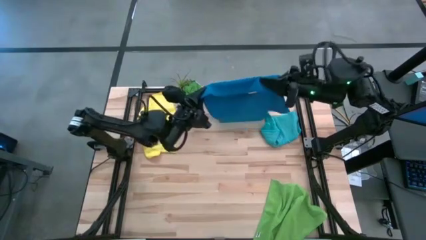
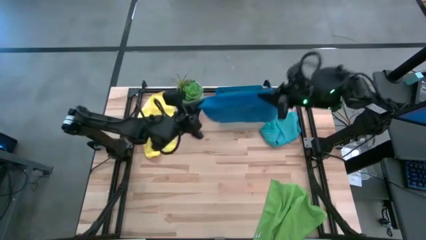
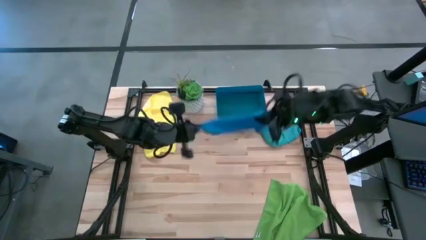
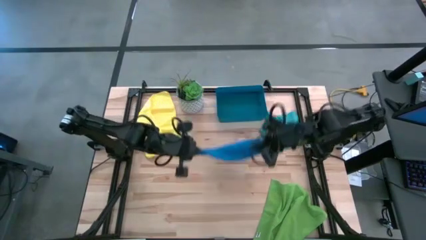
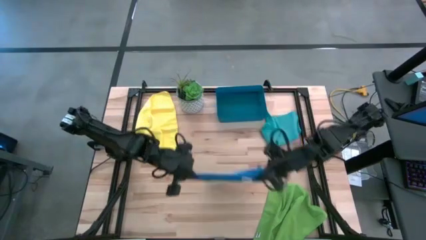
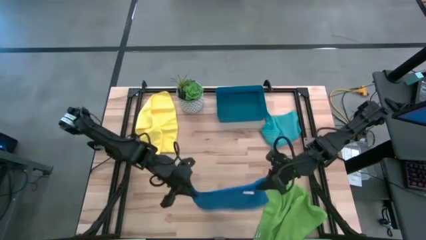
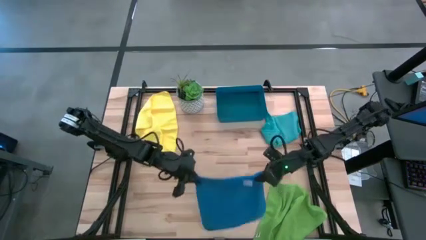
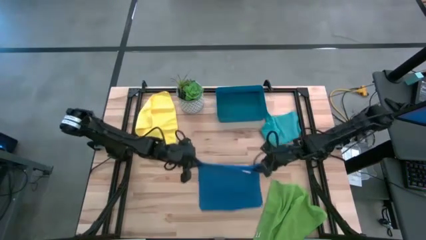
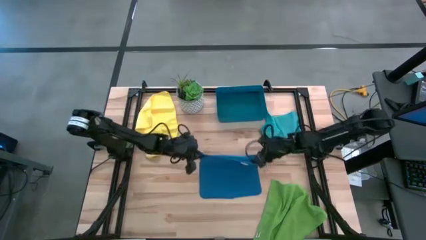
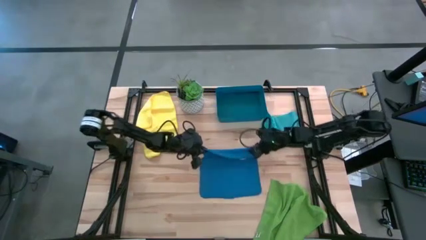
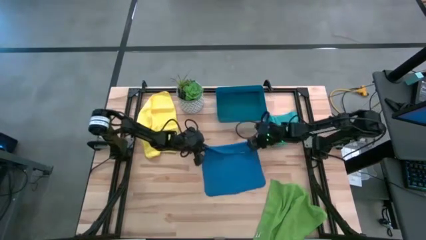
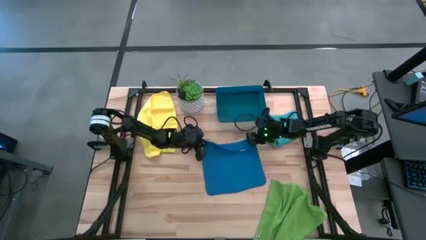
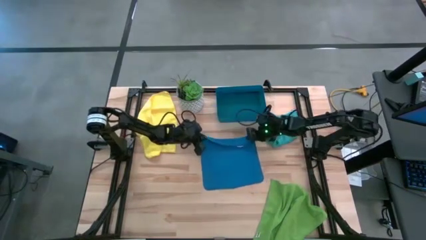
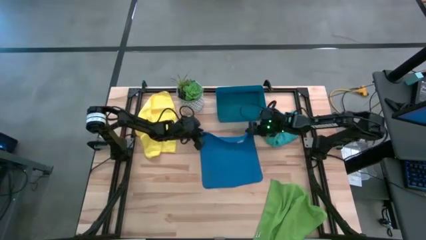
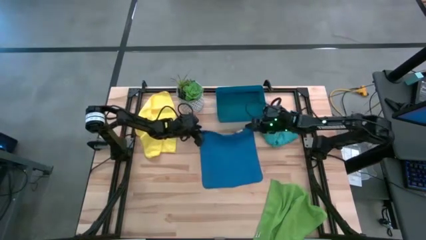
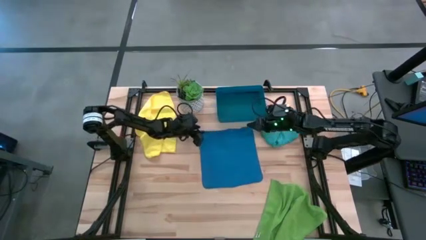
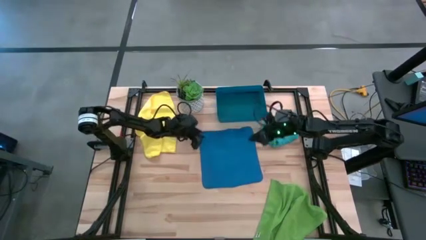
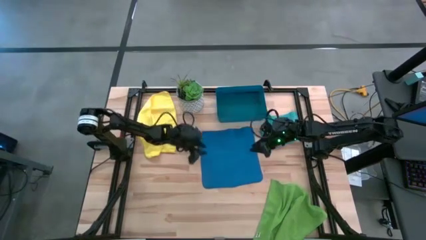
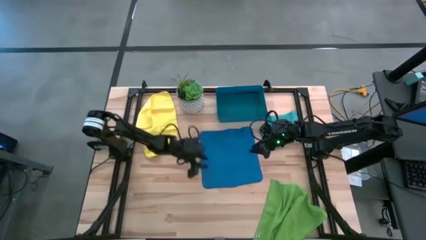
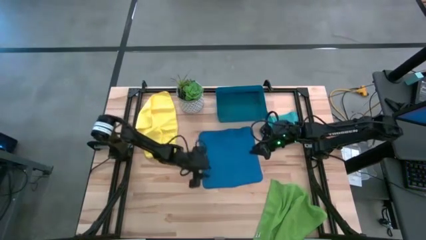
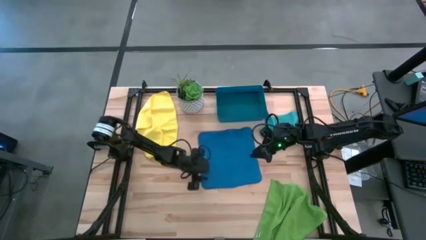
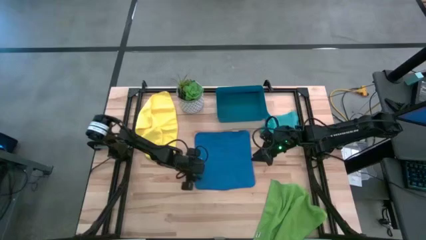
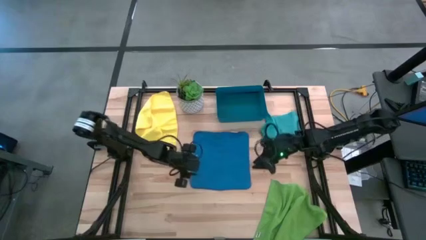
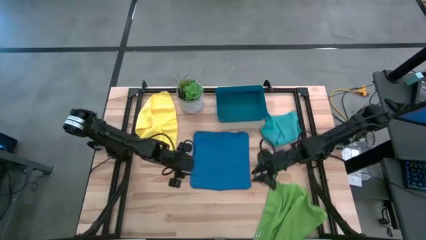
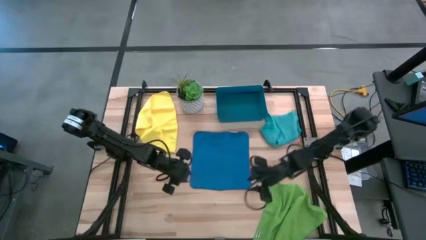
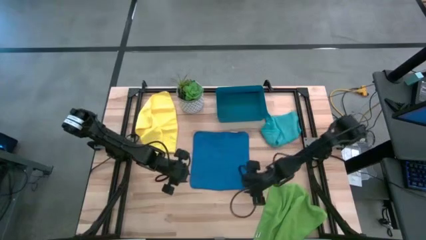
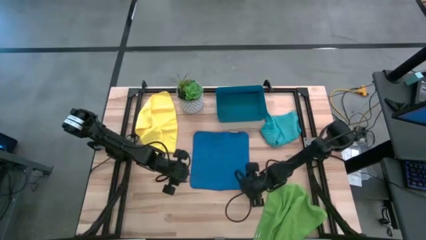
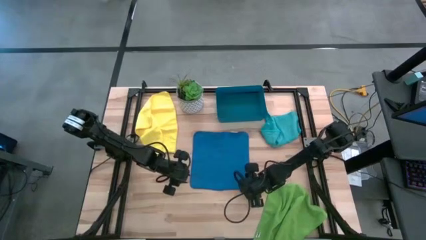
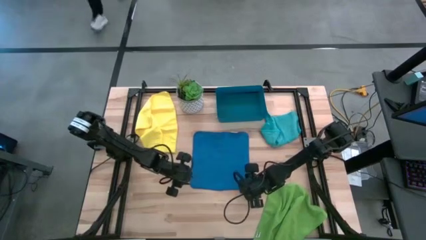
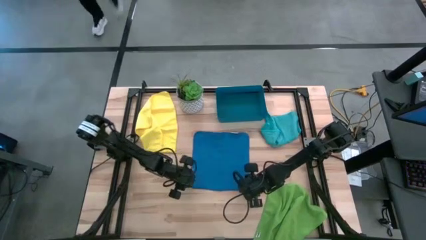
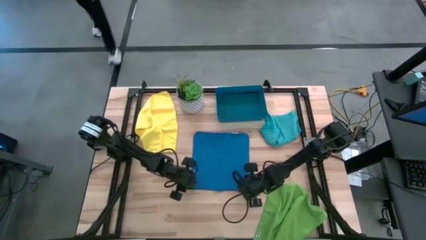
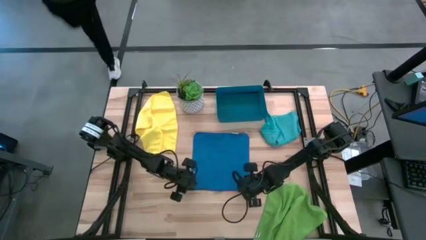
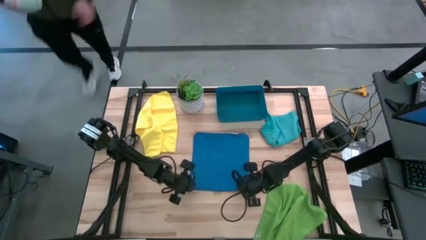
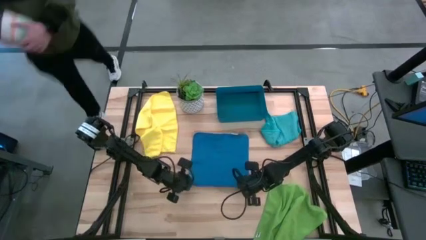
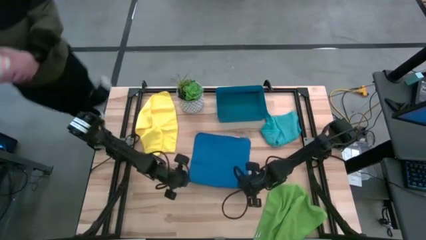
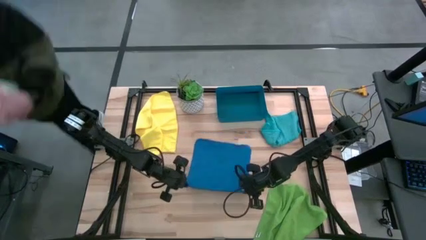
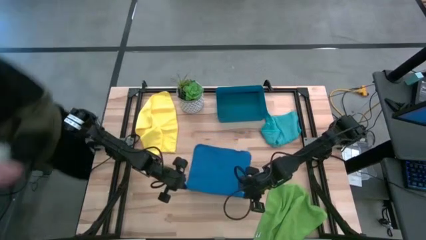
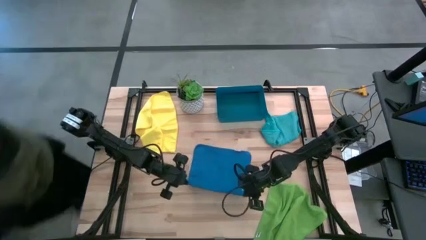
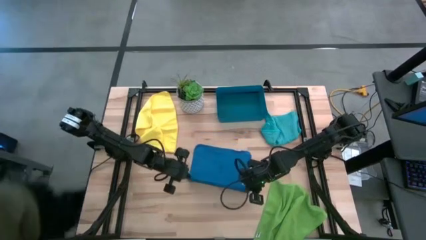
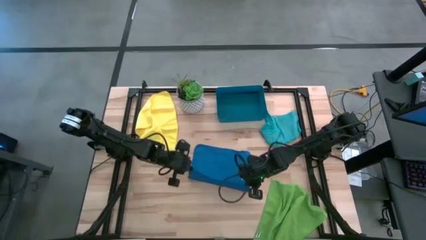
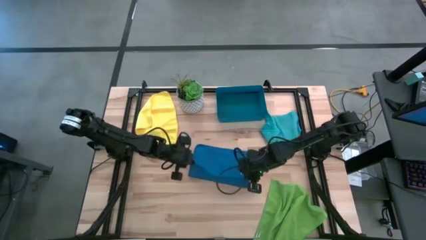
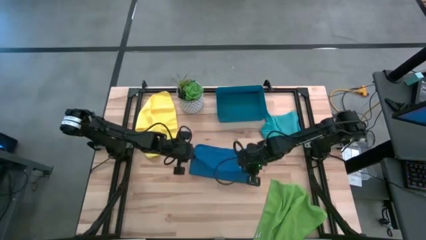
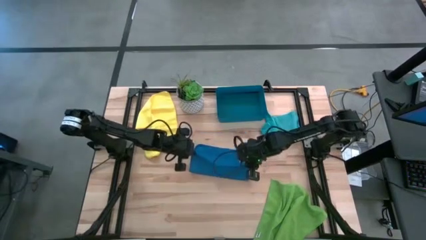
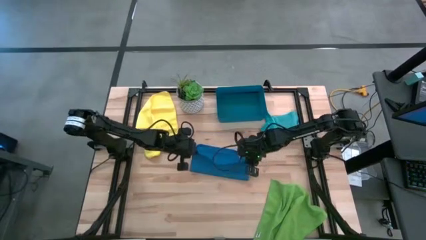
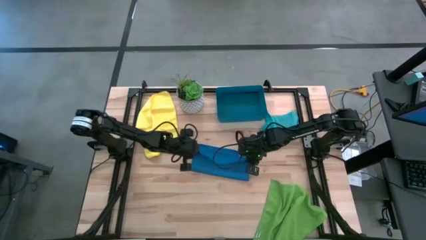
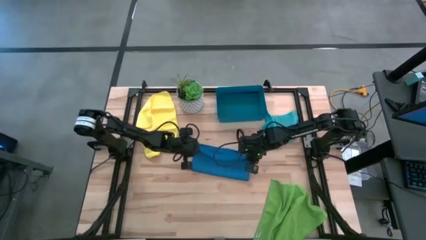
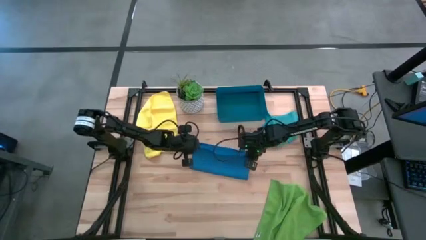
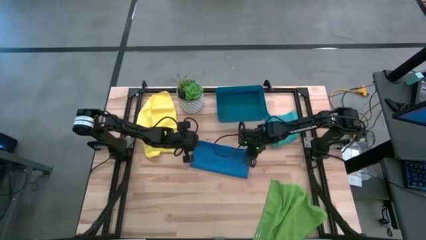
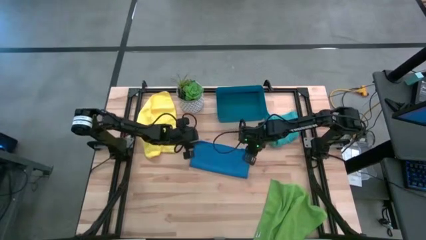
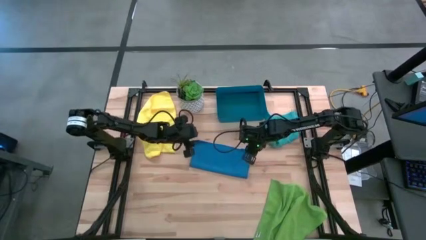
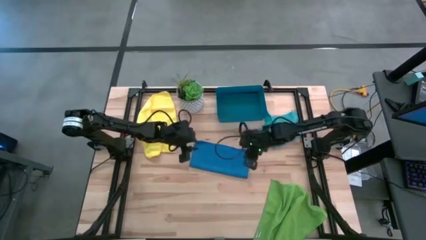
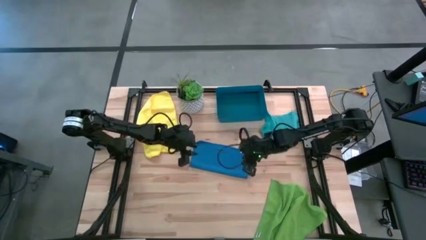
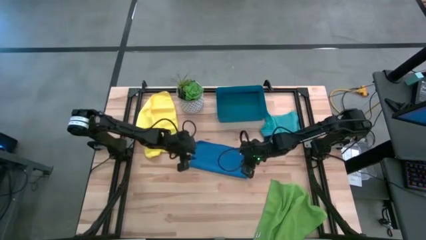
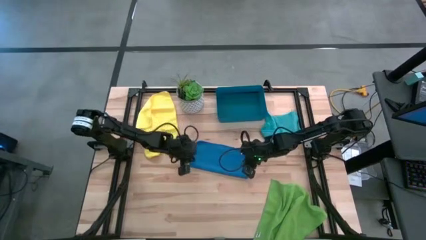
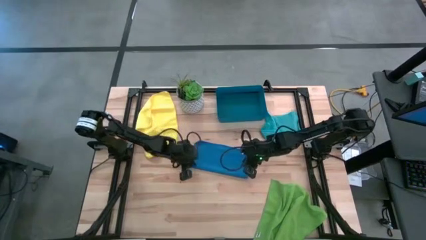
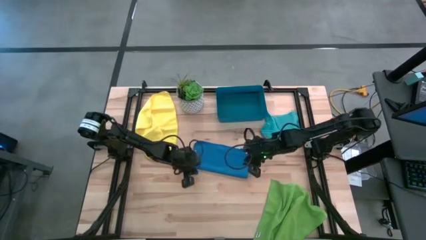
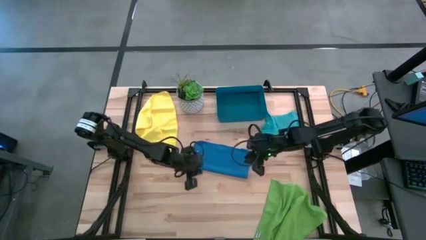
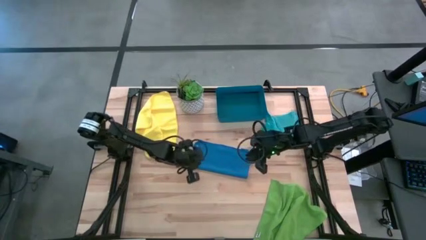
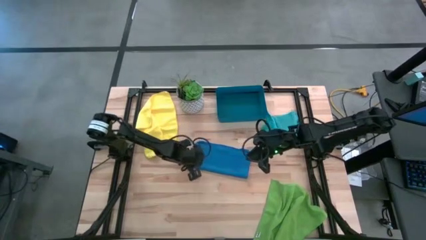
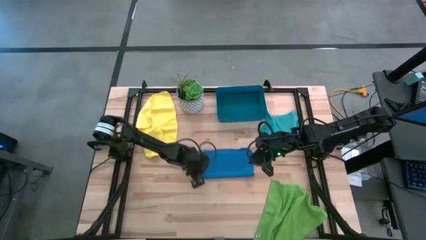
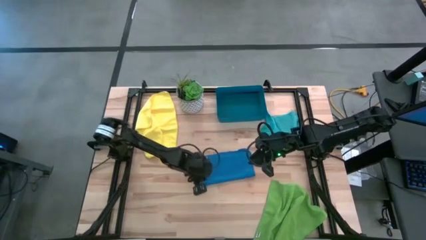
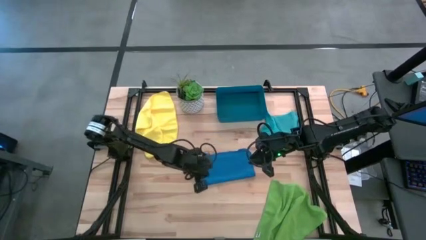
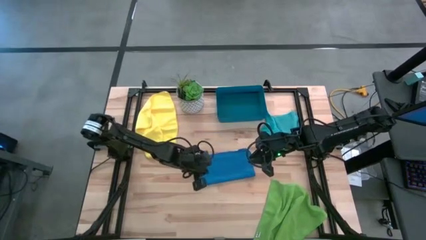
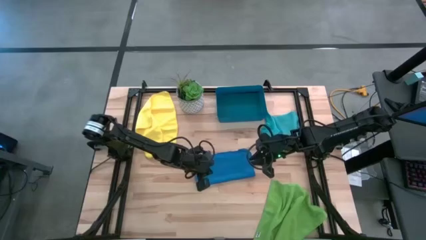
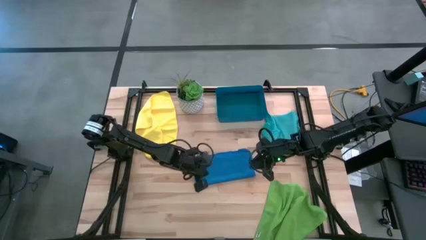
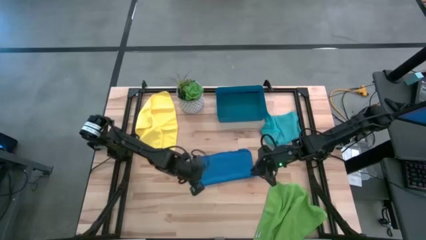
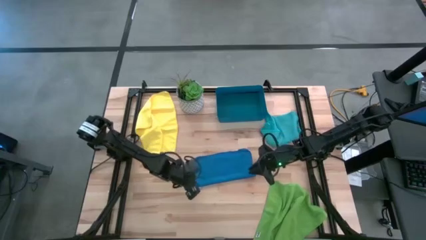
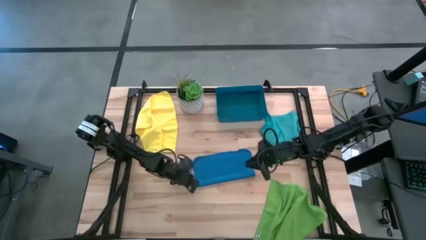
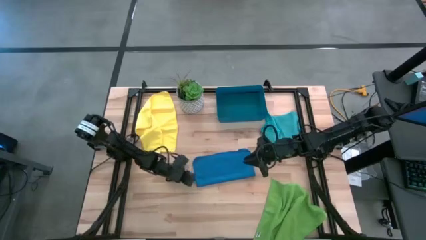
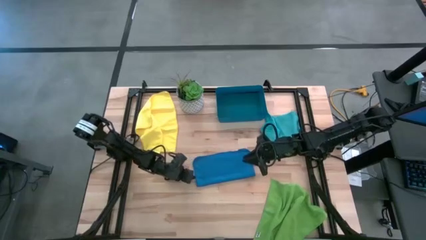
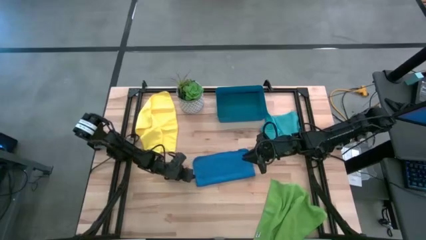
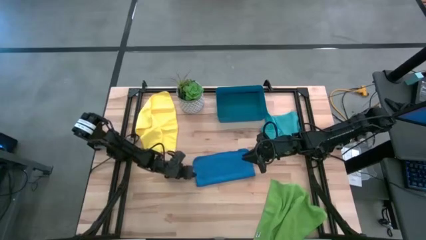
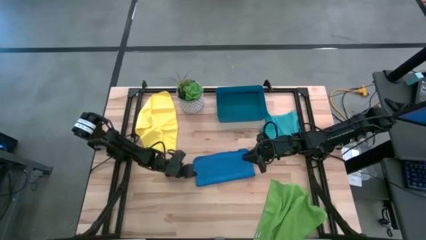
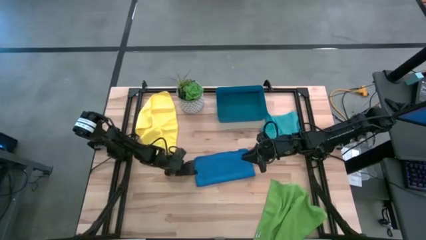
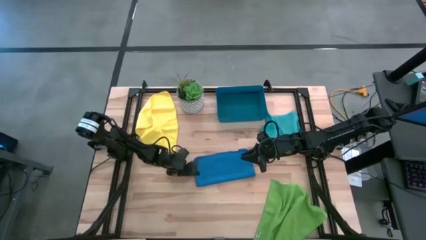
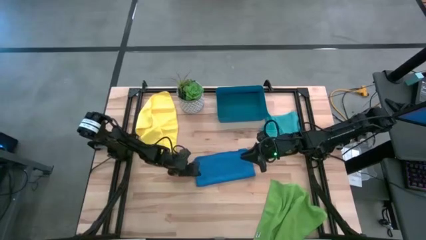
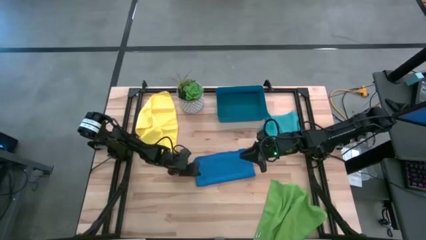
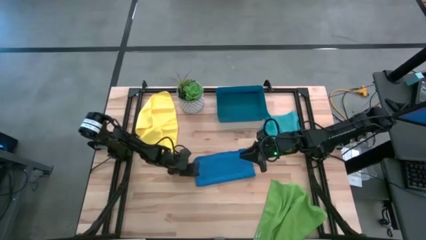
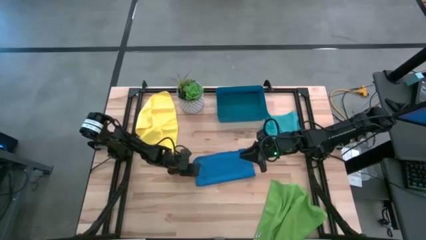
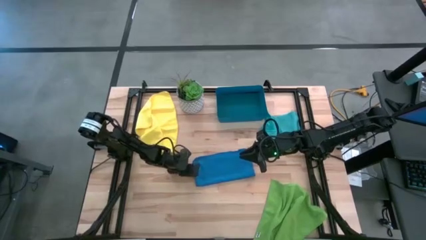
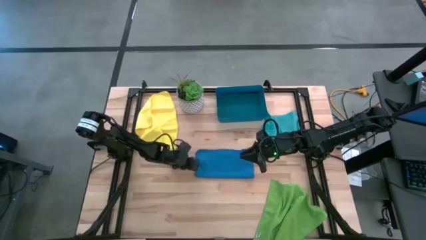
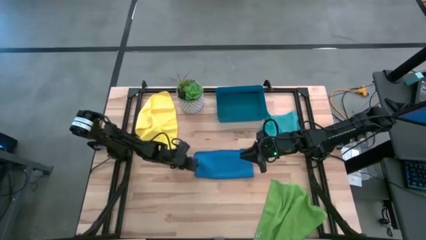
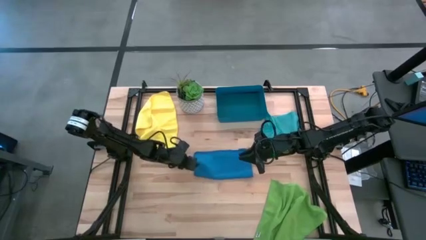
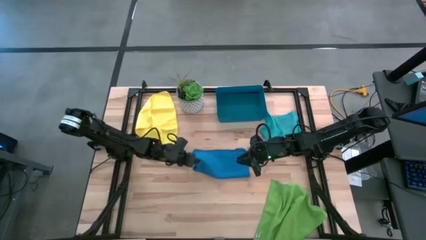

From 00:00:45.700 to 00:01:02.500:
Task: Fold microfiber towels
Fold the dark blue microfiber towel into the dark blue bin
